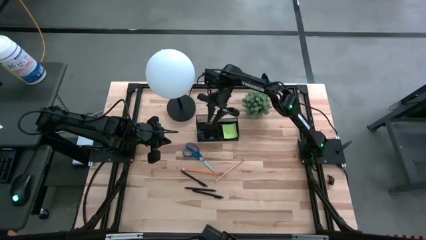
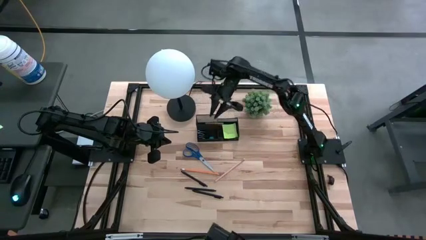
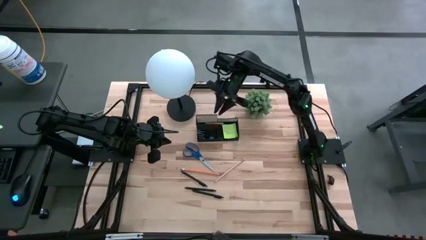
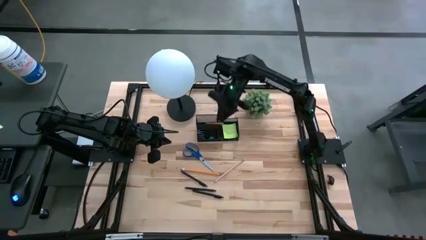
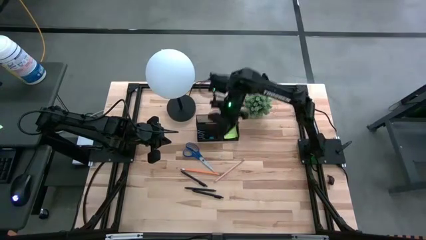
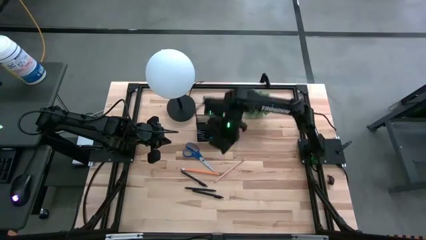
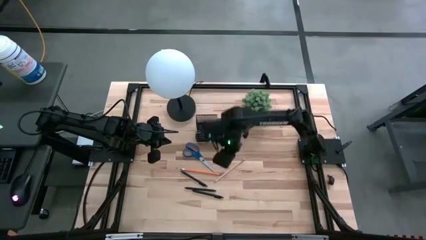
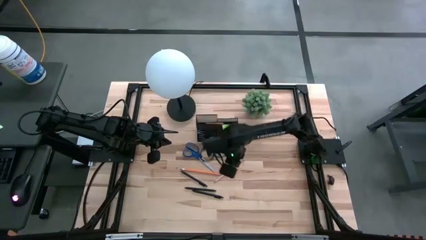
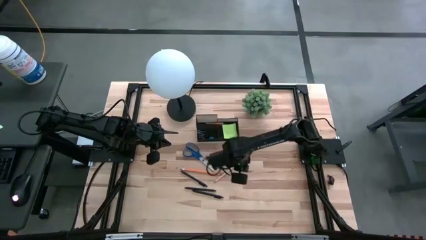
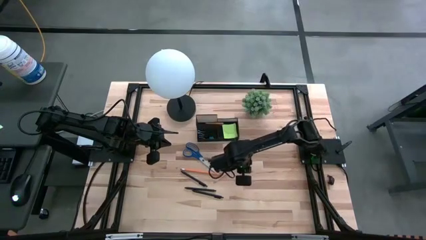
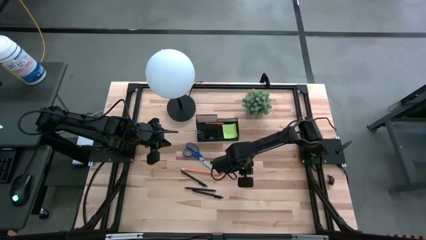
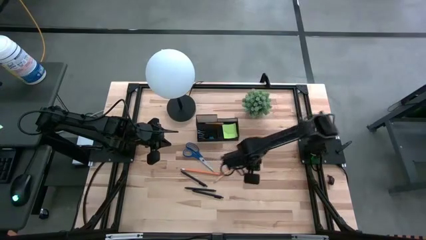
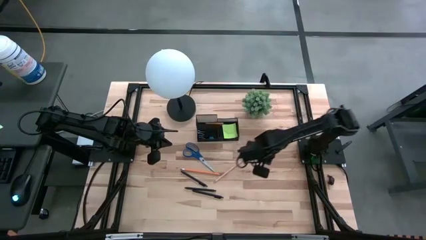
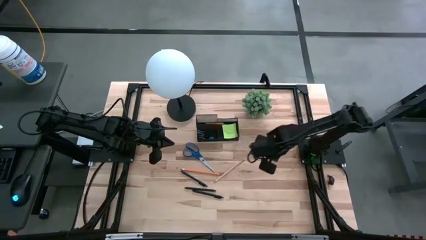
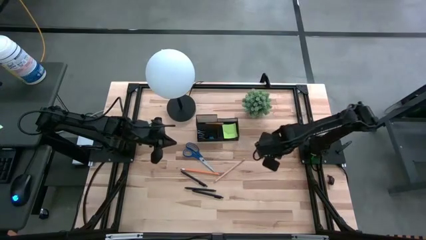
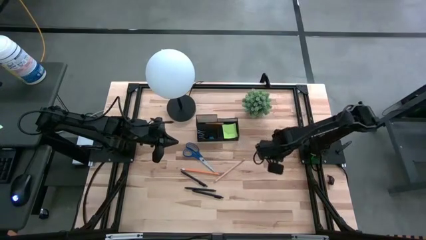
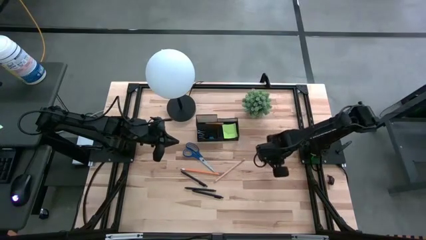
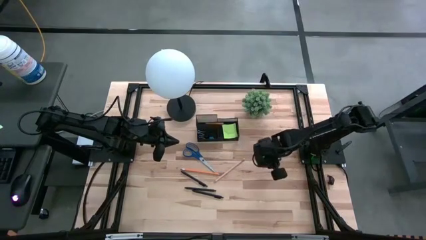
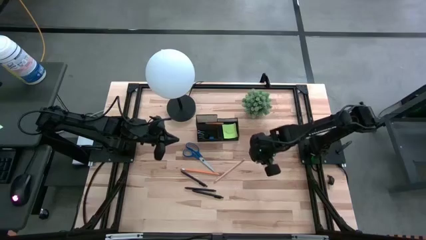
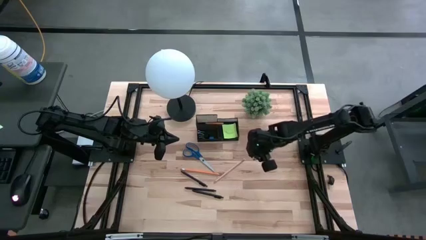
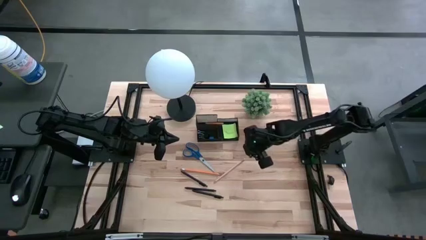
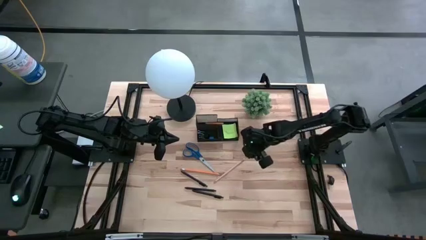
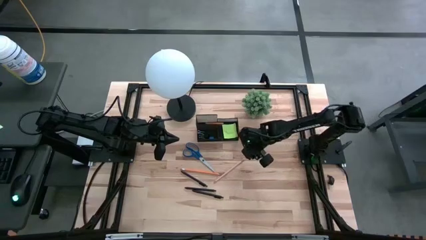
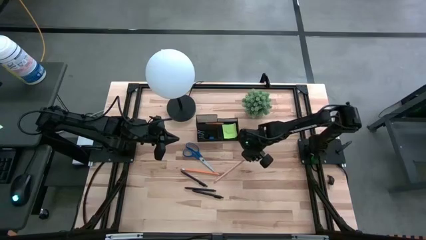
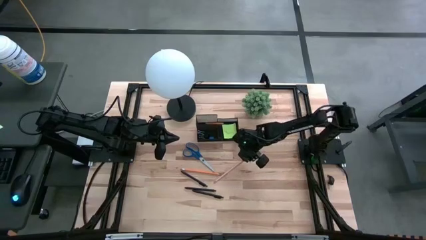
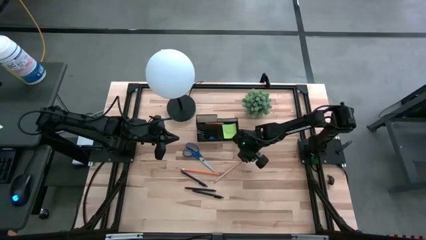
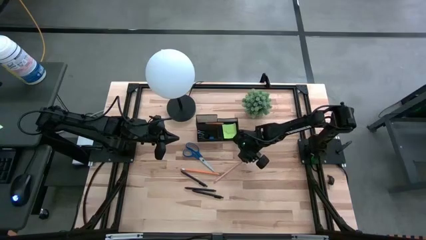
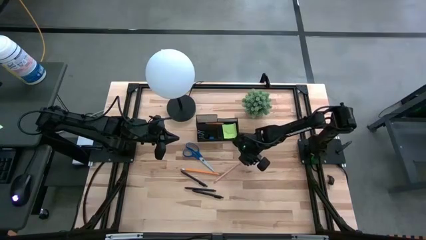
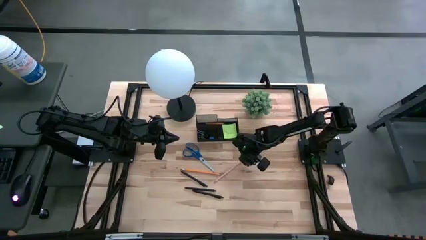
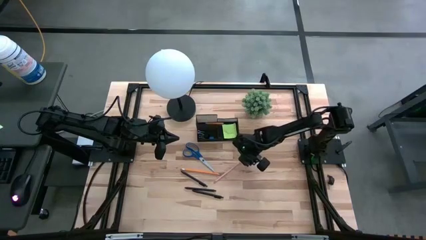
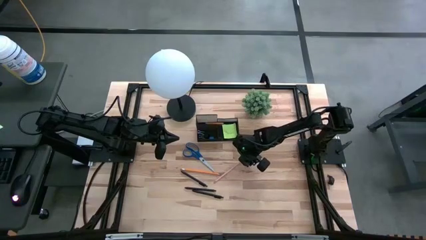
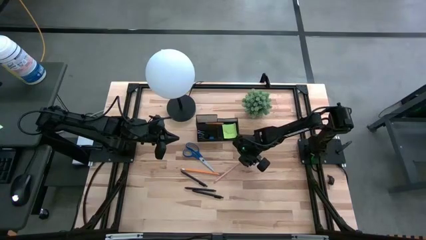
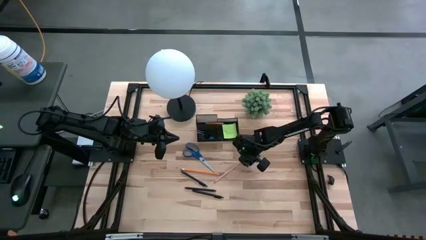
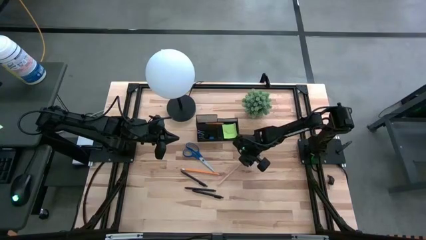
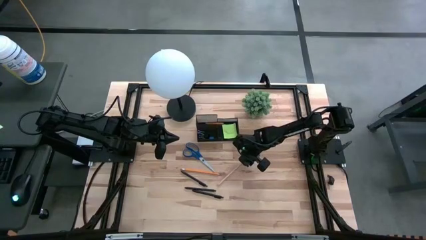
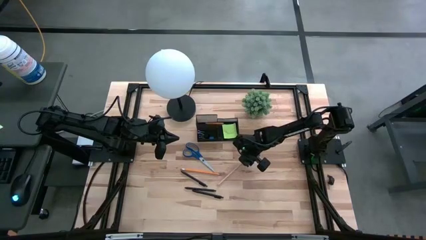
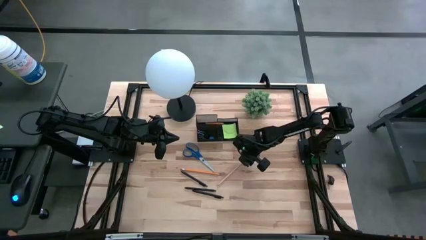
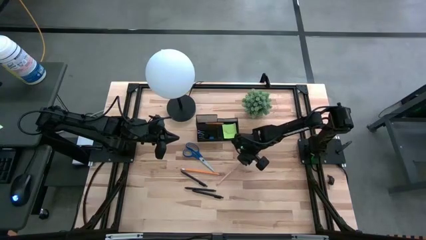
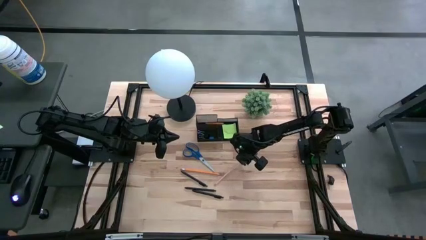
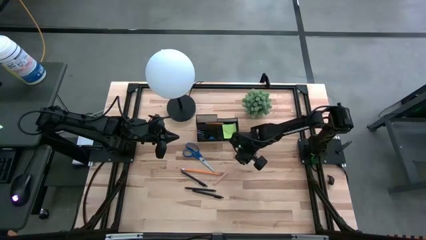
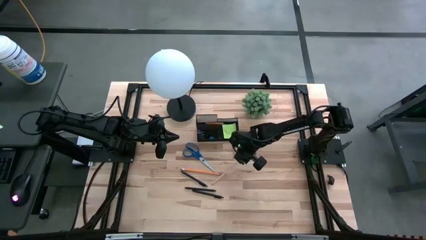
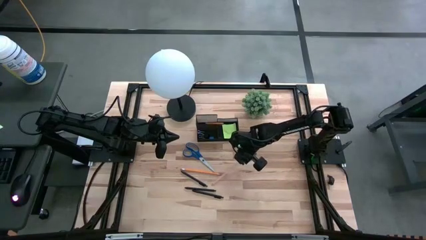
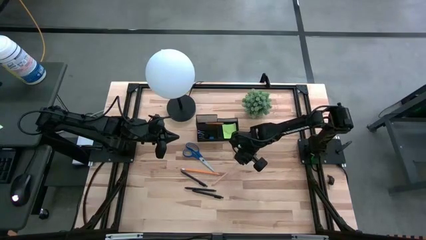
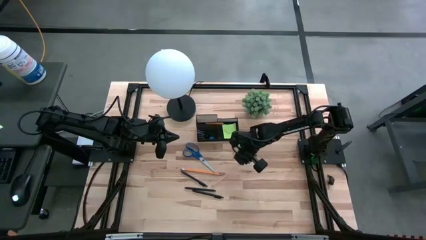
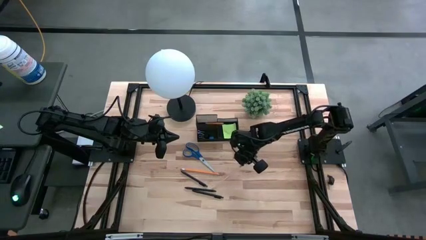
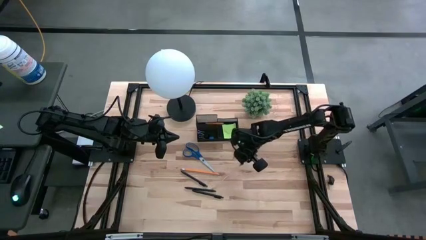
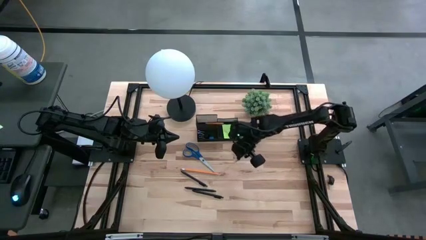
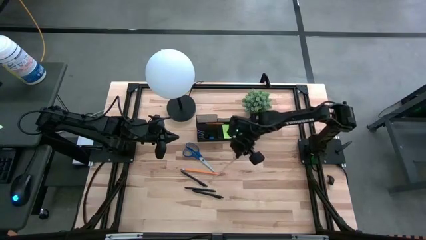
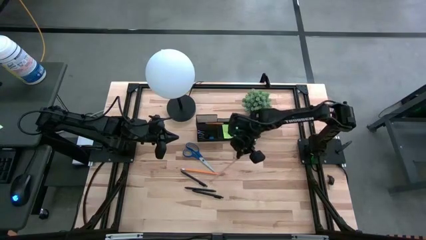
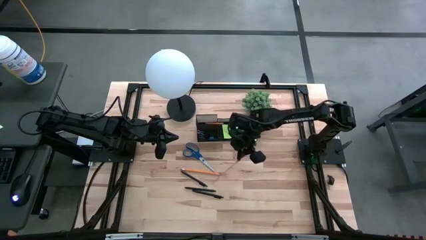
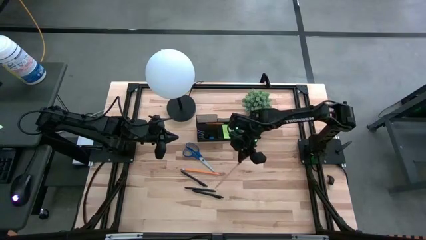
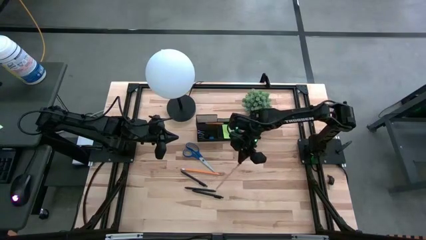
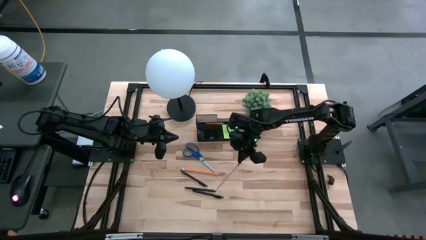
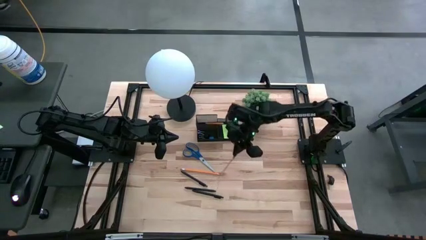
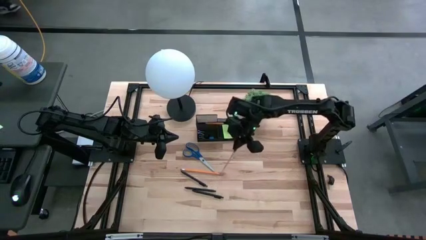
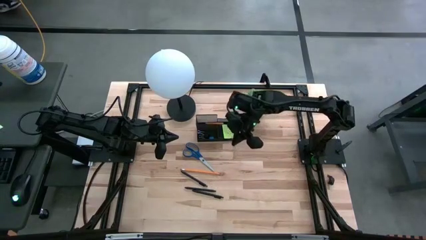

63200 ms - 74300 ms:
Task: Pick and place office supplies into organizer
Put the pink pencil into the desk organizer

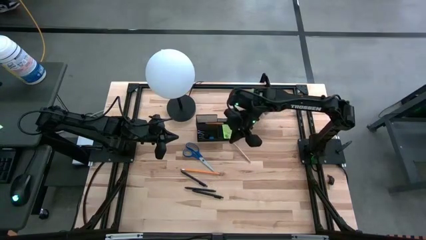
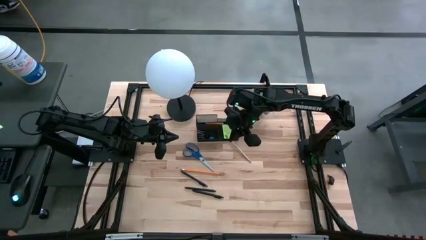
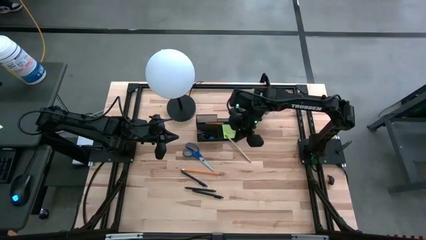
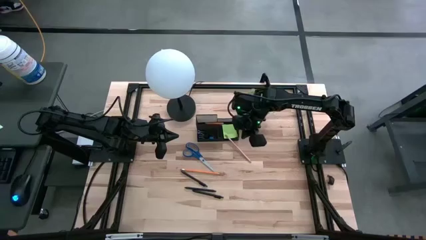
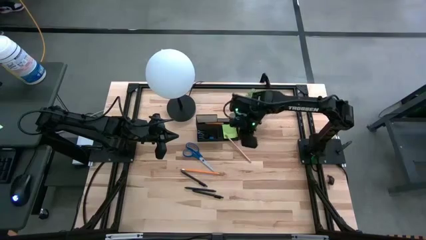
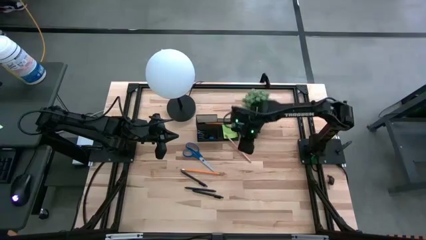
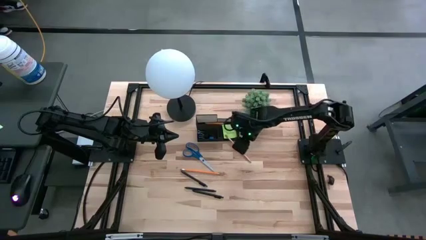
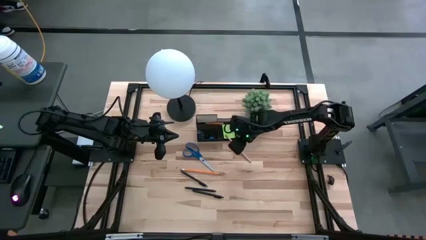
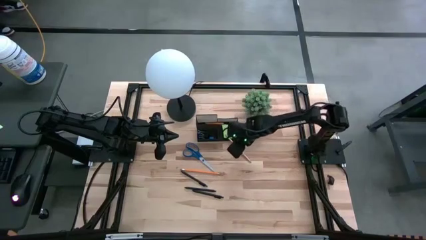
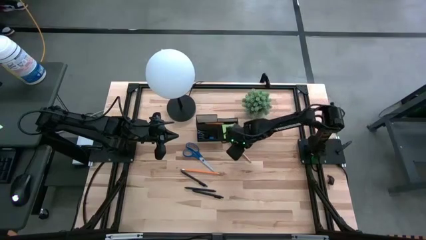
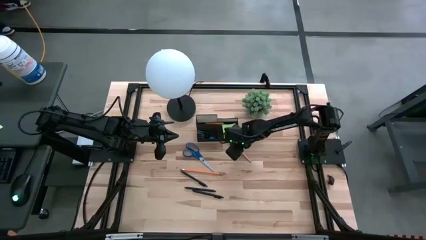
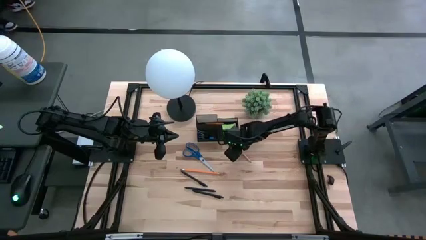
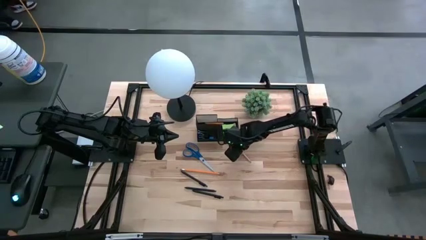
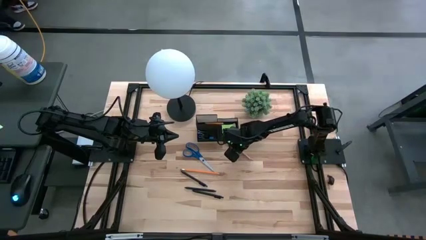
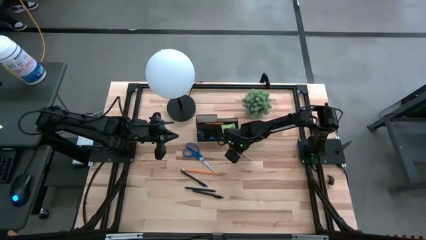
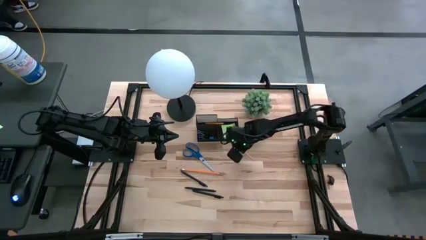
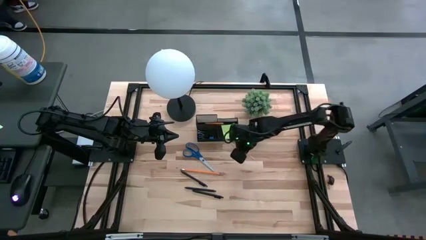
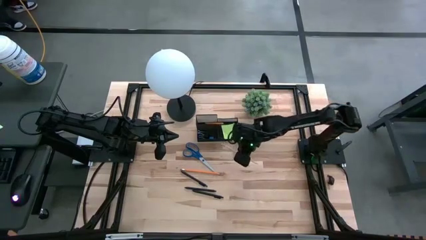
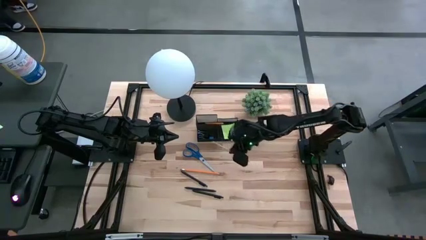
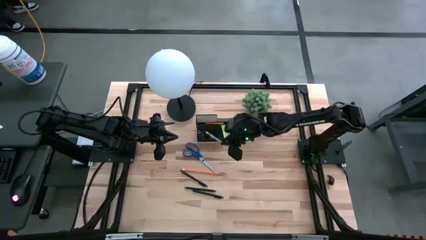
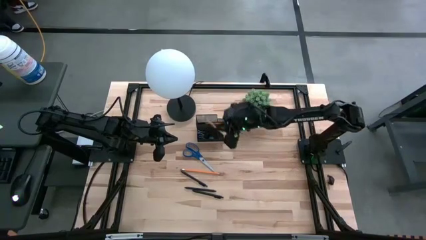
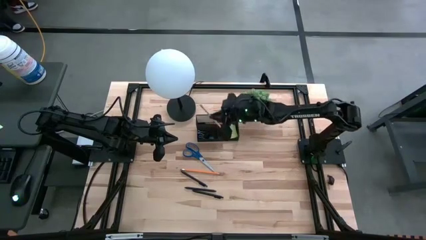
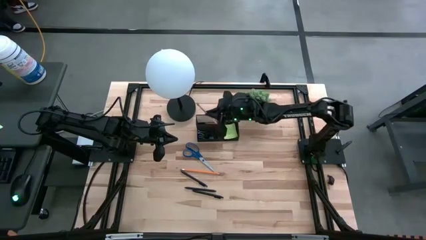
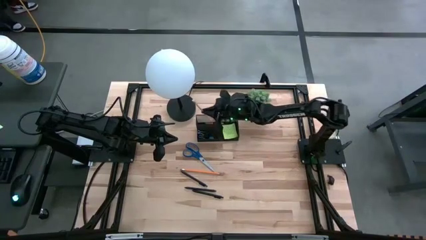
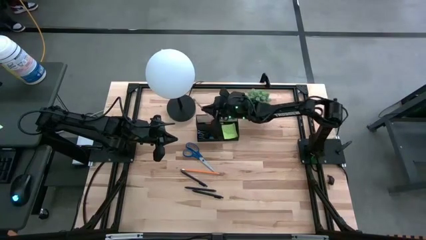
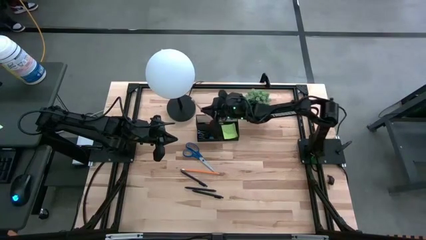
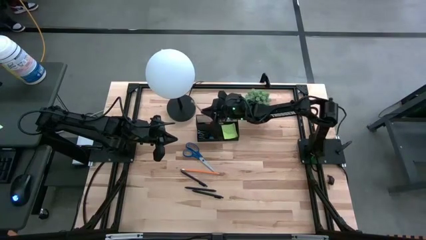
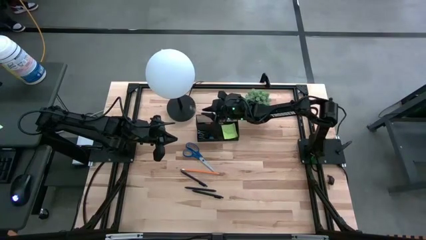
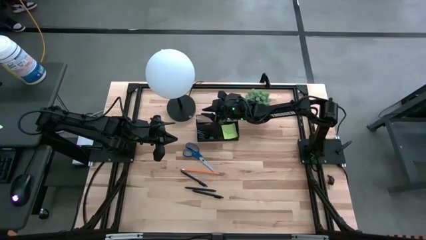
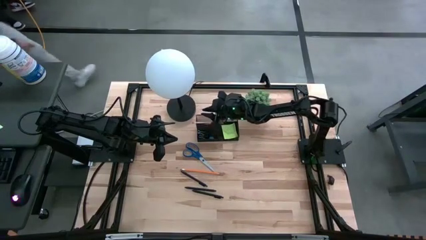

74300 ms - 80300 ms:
Put the pink pencil into the desk organizer
